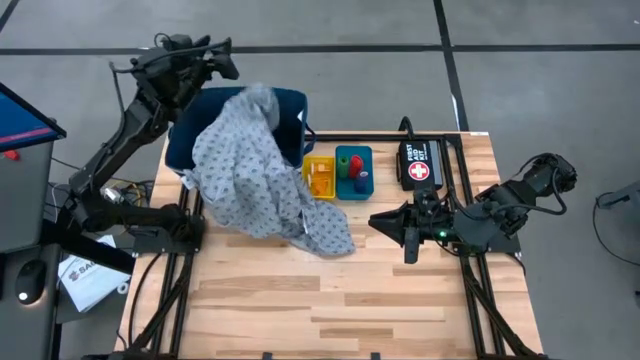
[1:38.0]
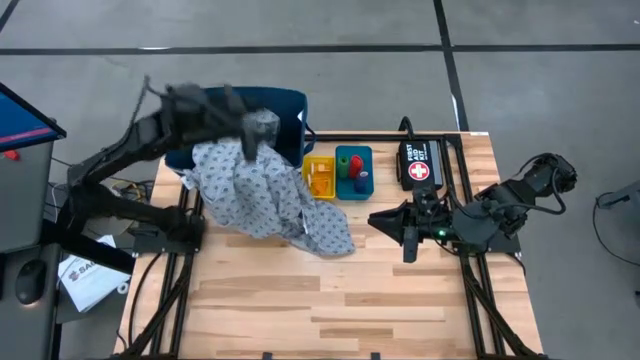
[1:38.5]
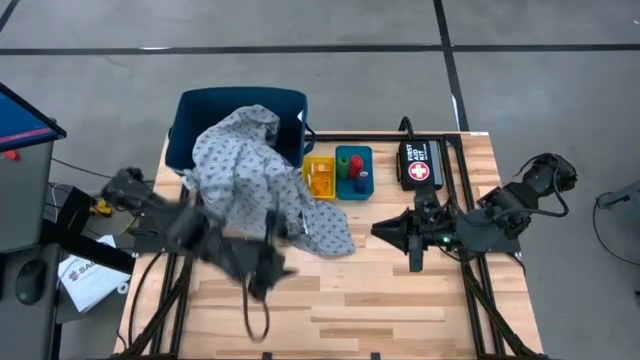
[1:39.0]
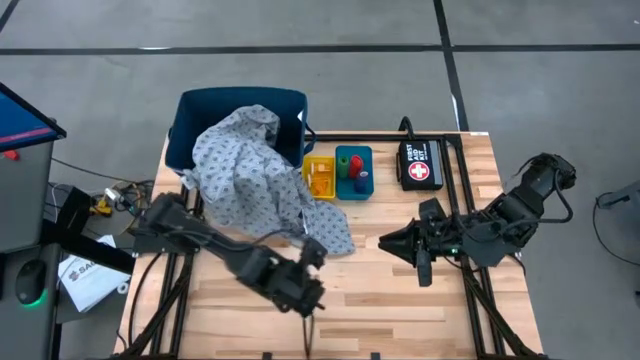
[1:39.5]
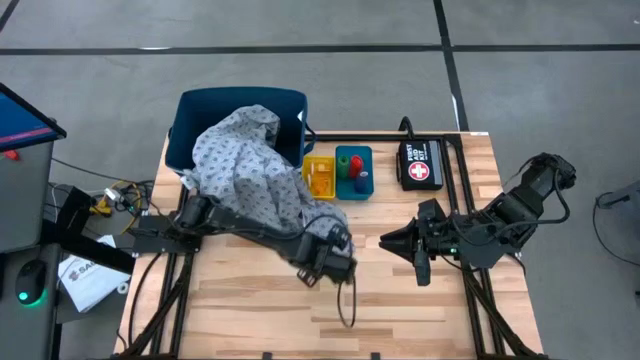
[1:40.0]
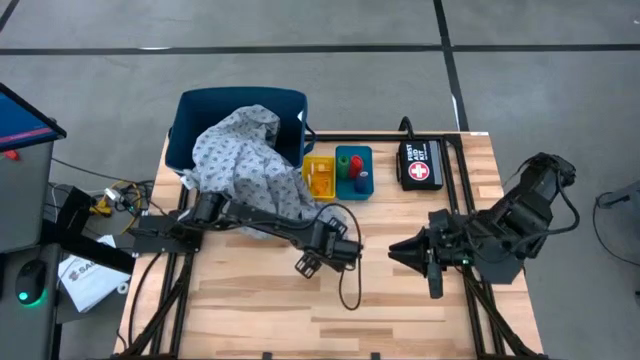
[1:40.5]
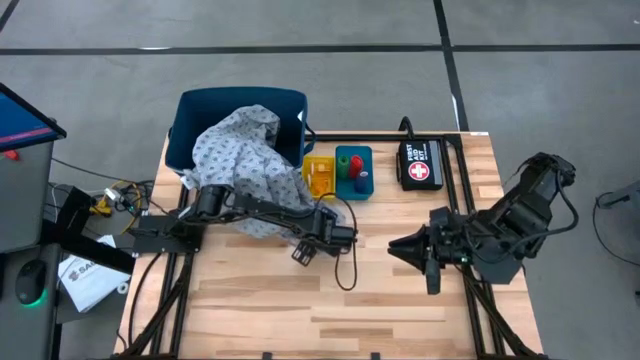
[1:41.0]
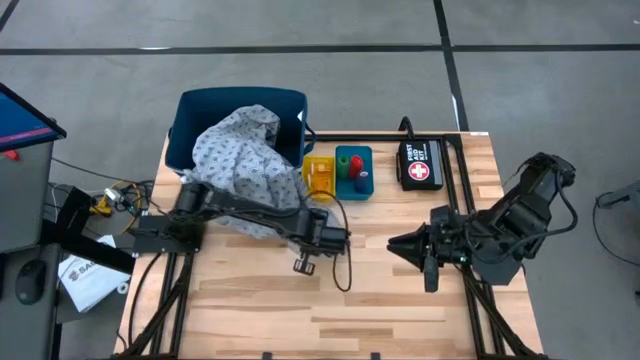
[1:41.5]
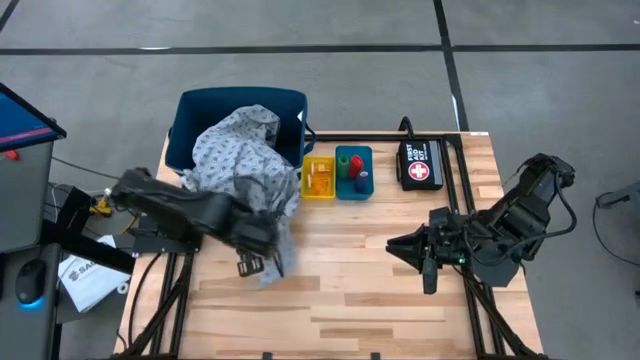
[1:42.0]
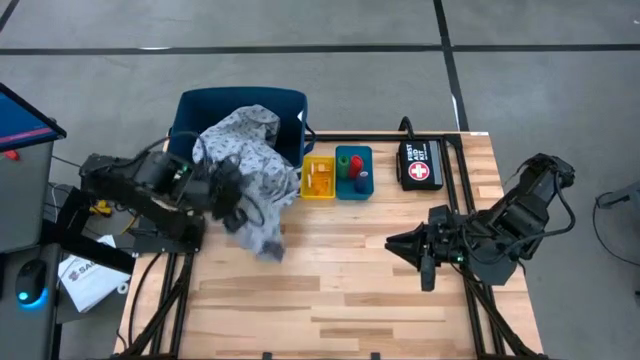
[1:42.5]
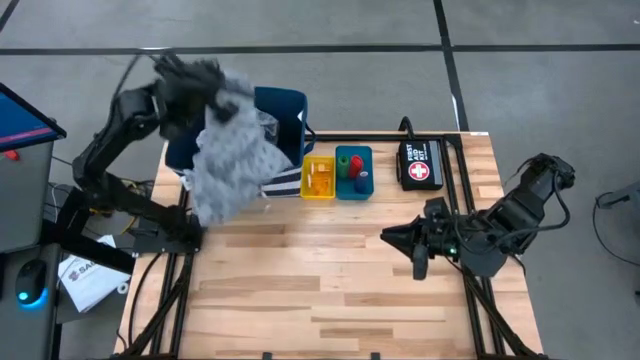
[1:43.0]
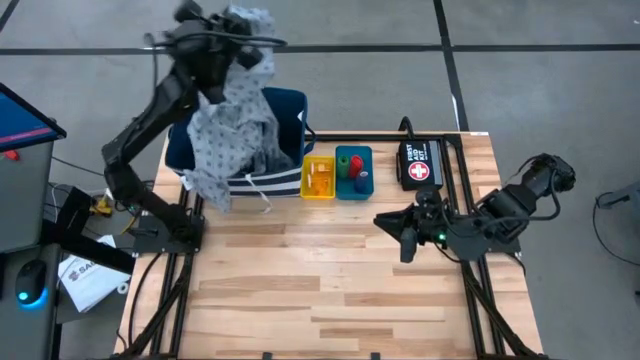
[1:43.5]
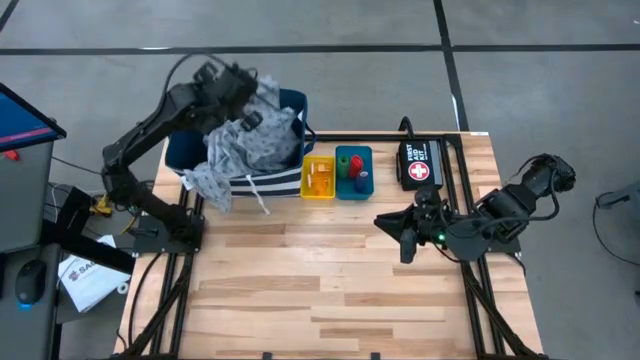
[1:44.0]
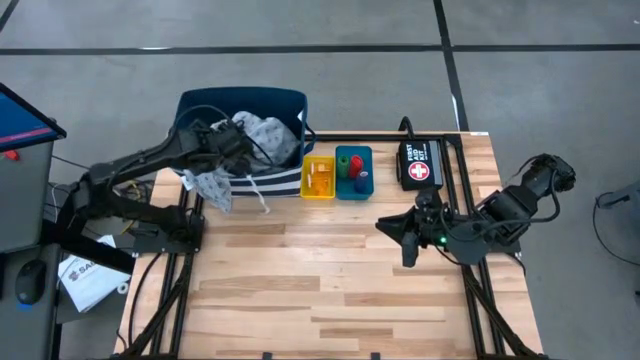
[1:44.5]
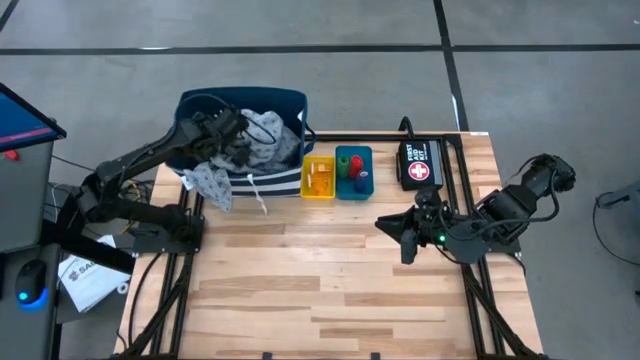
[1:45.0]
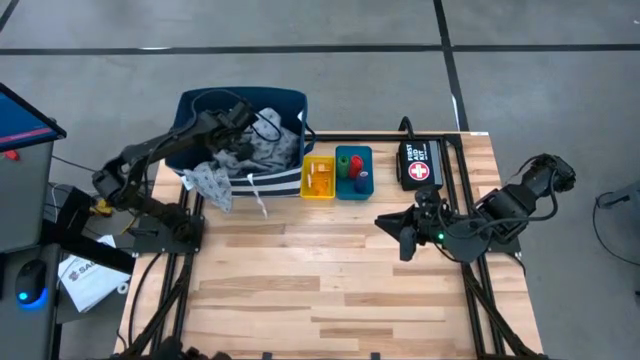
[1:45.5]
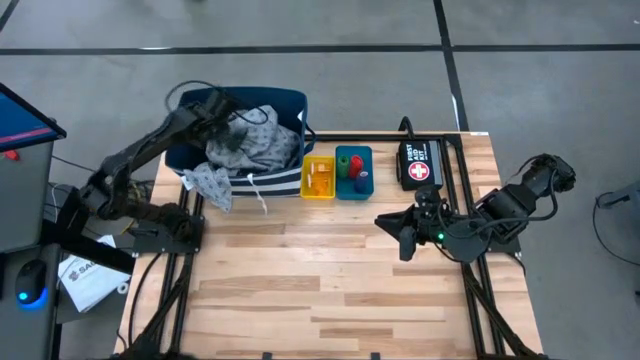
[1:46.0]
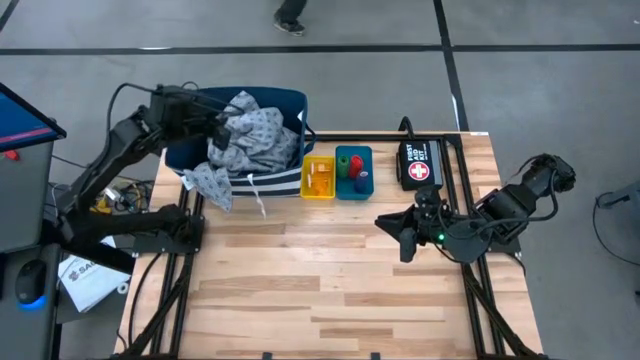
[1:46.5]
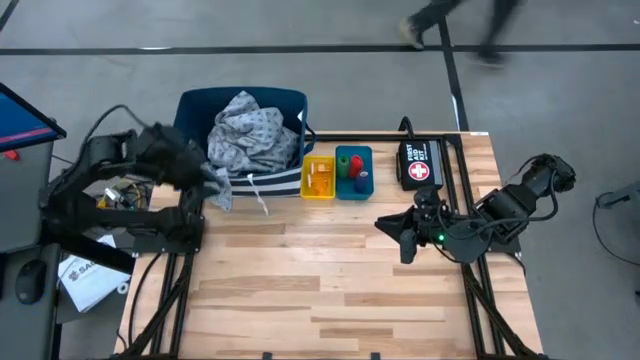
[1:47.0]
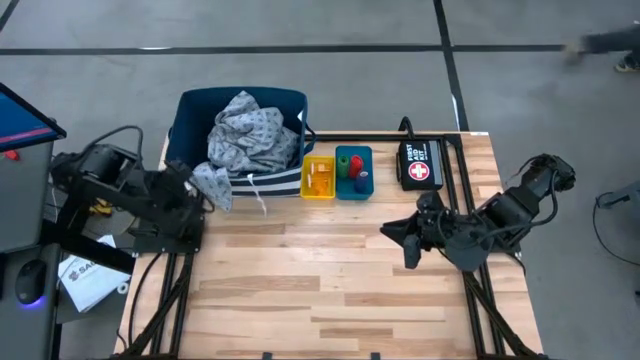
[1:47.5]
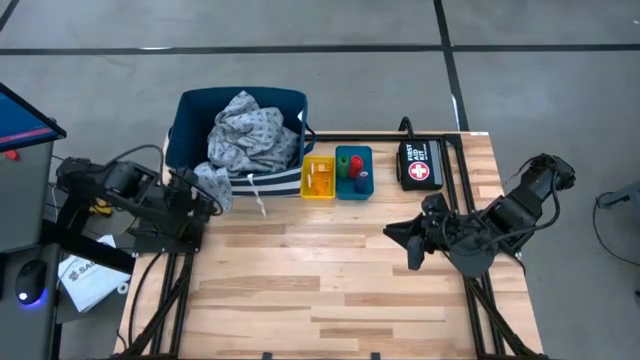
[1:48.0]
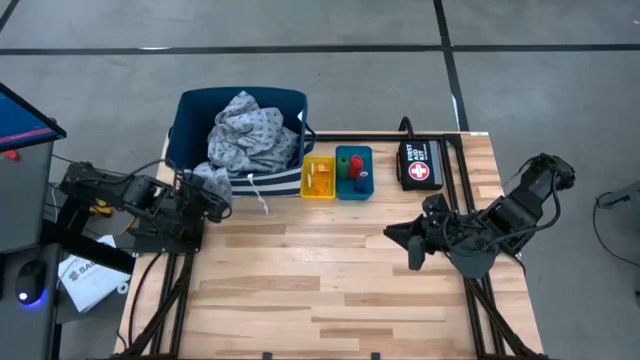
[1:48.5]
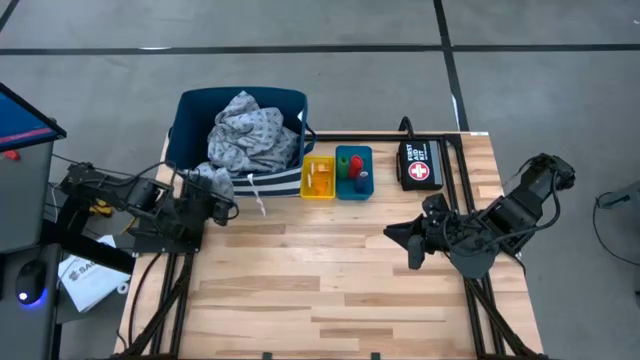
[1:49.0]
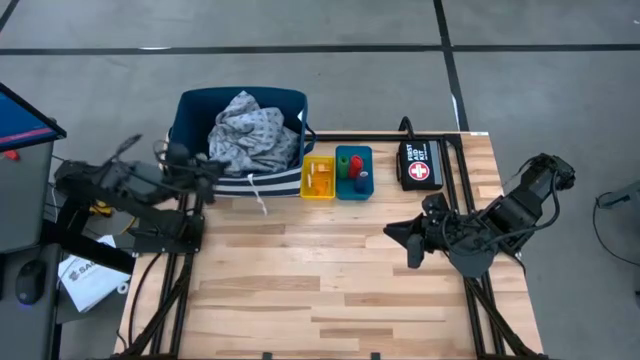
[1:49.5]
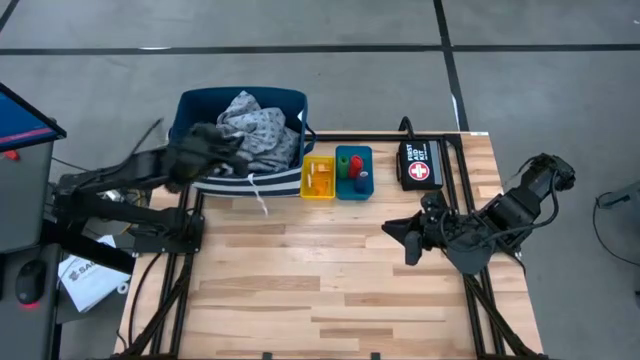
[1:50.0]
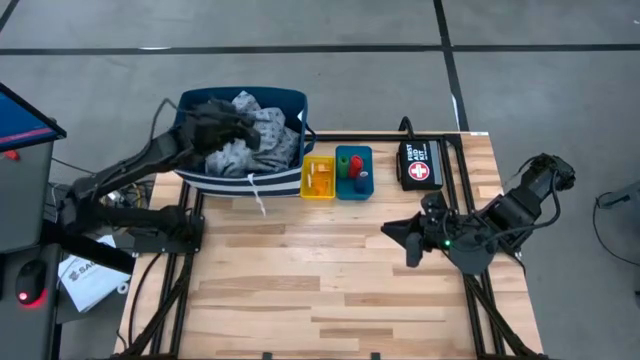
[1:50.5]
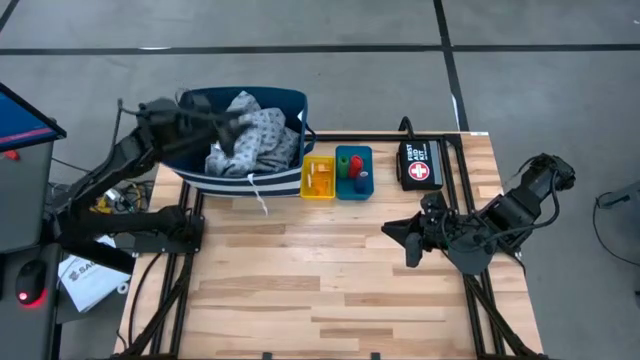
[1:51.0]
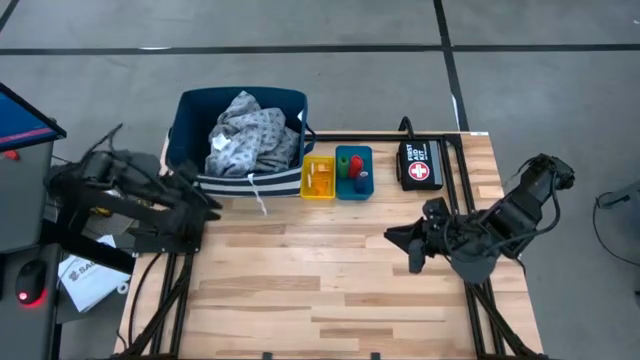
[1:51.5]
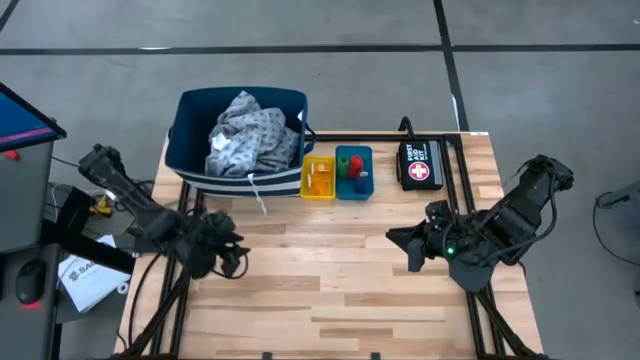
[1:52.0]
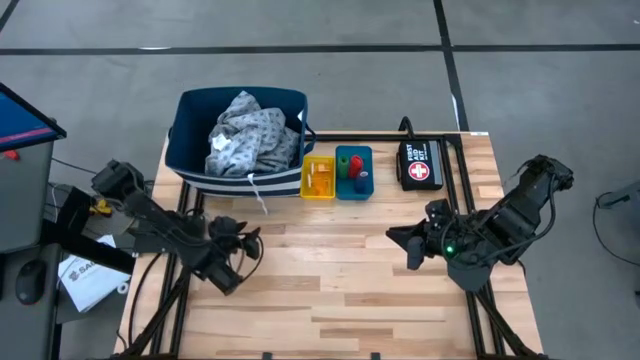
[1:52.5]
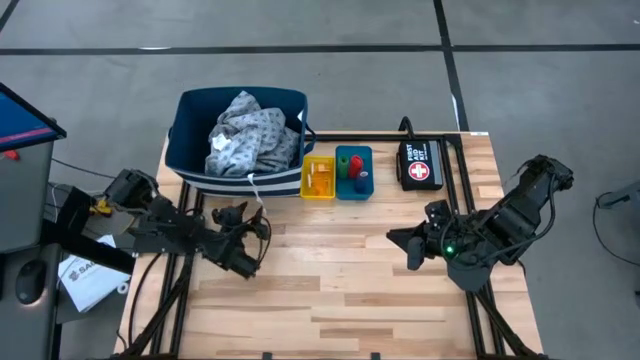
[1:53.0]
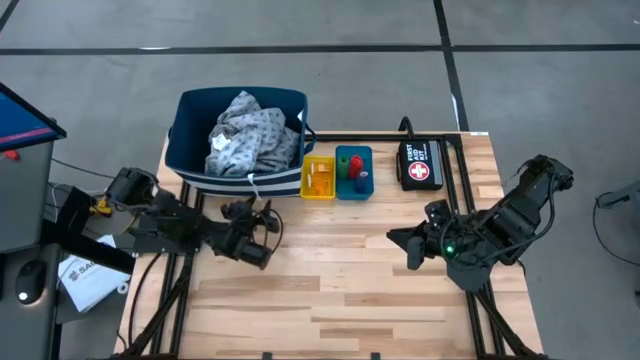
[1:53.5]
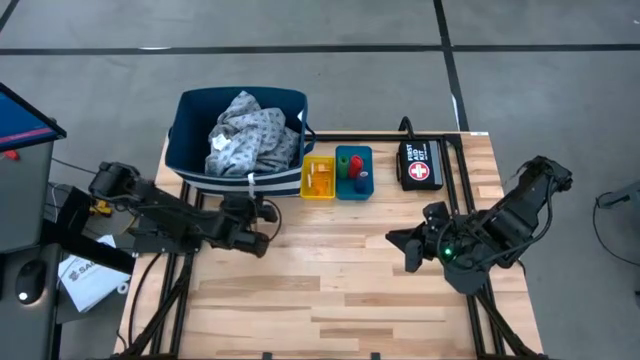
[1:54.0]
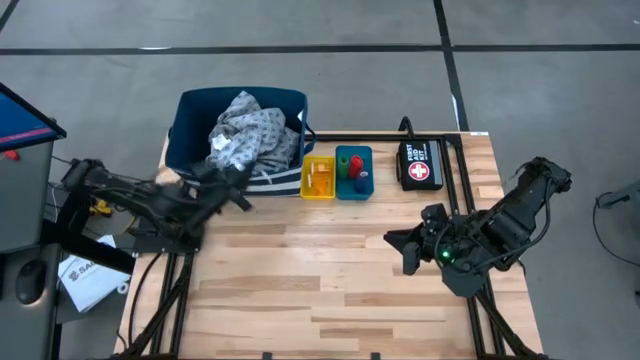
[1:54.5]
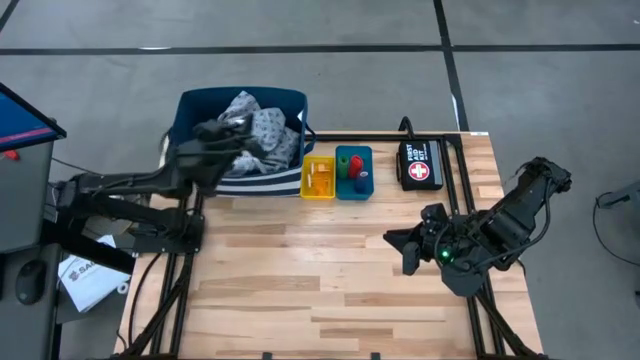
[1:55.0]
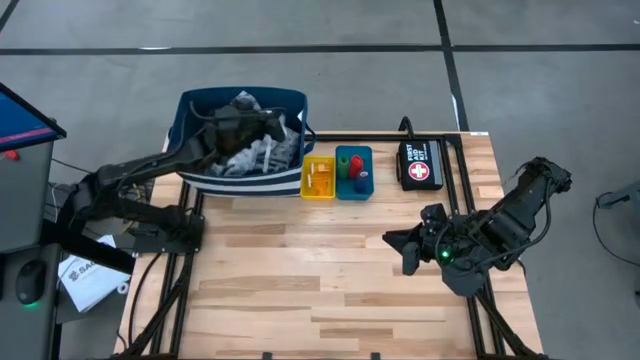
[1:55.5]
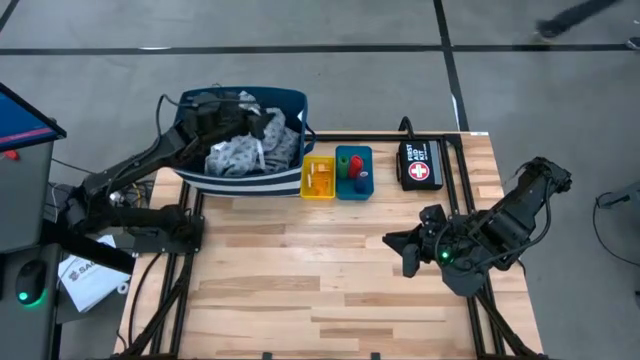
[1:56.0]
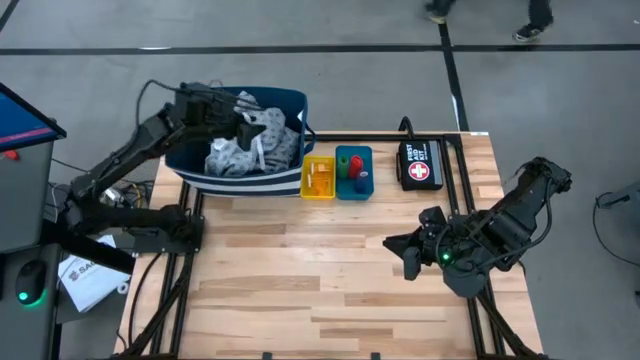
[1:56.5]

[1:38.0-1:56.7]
Task: Pick & place medical supplies in basket/bin
Put the blue patient gown into the left blue bin

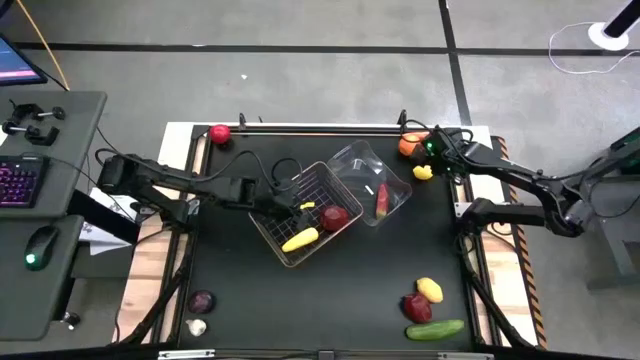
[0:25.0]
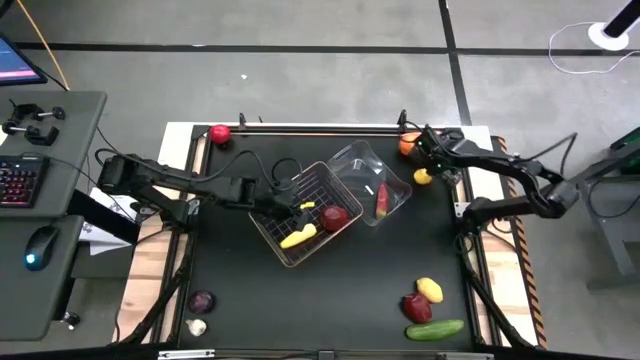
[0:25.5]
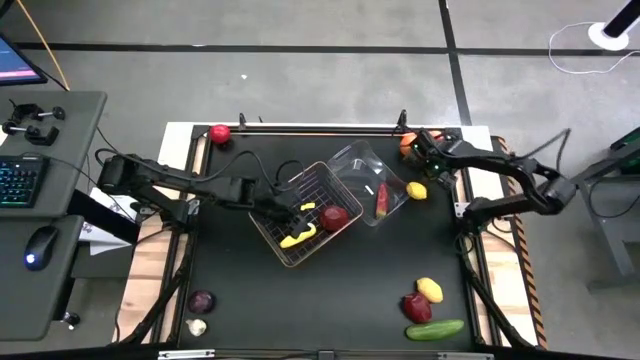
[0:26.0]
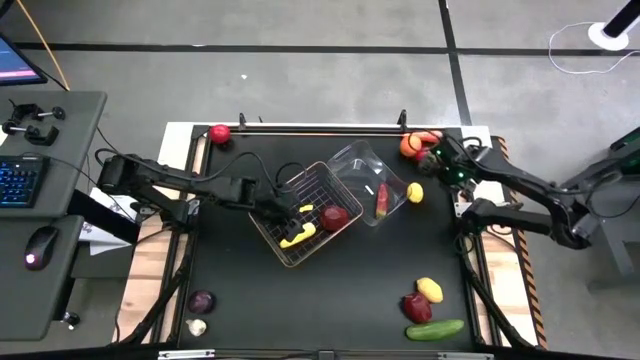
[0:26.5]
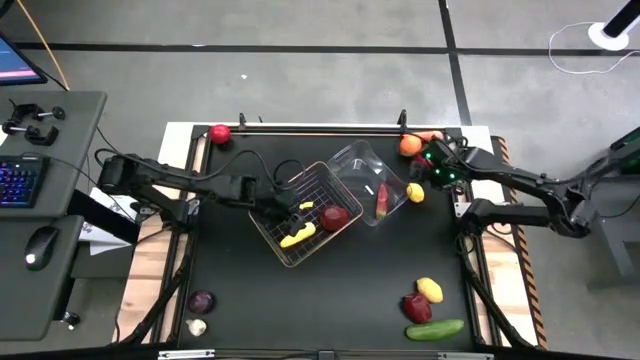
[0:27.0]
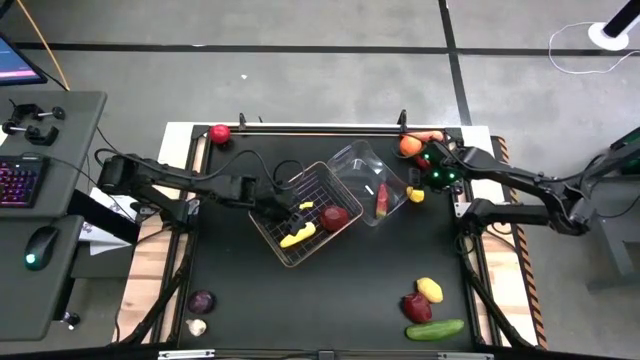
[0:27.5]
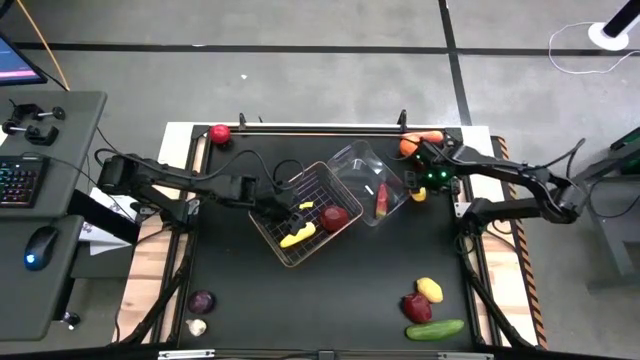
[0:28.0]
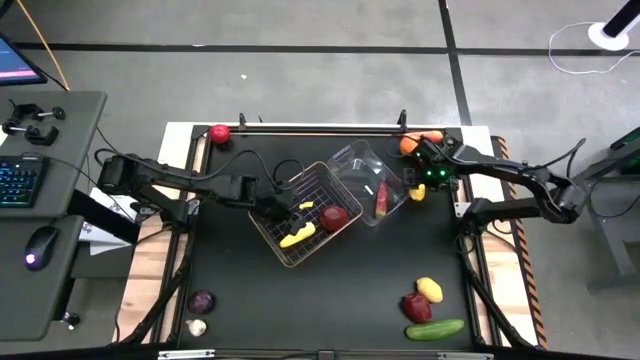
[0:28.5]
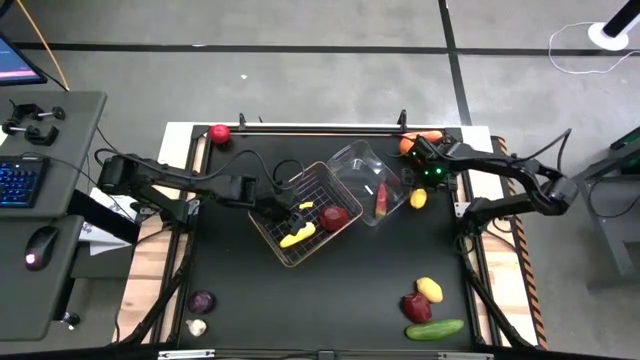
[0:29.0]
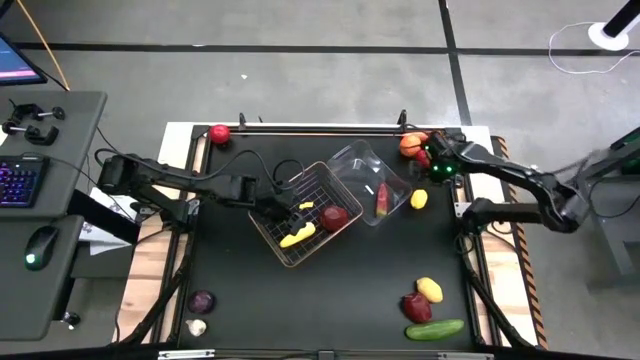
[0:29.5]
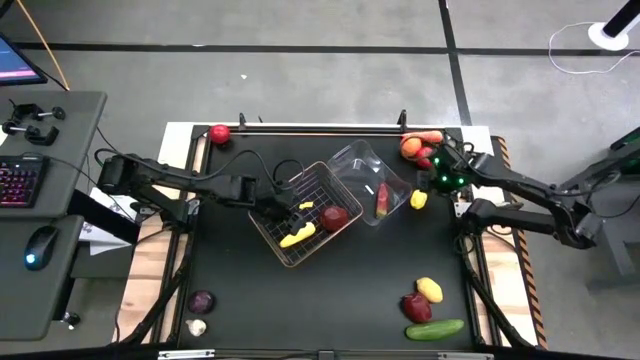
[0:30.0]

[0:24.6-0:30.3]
Task: Sort produce into baskets
Put the top lemon into the gold wire basket
